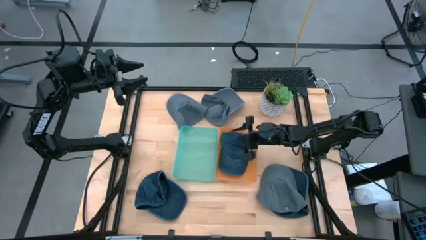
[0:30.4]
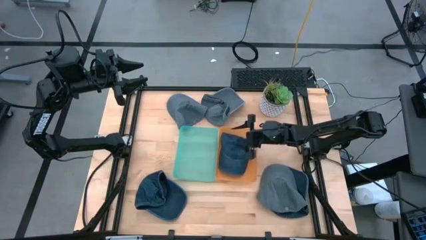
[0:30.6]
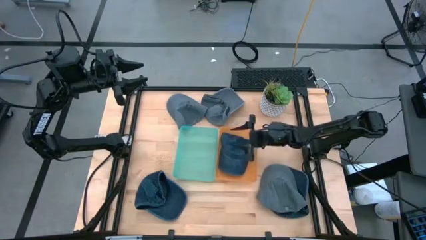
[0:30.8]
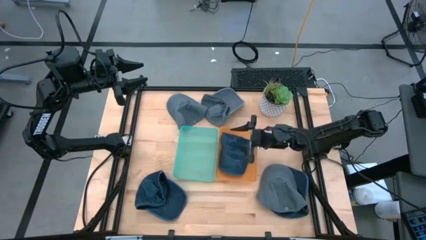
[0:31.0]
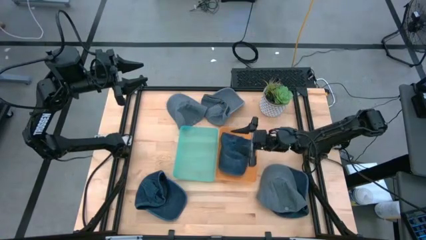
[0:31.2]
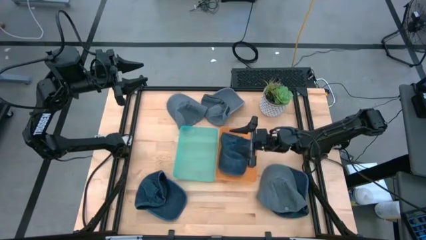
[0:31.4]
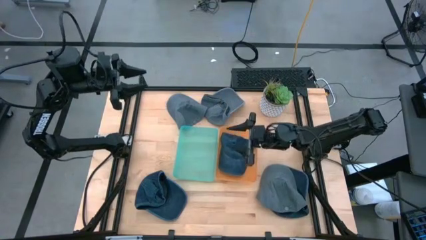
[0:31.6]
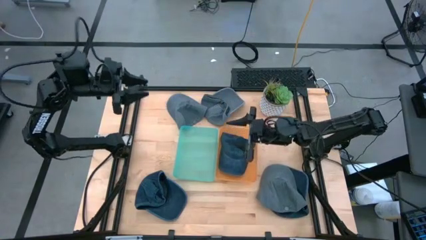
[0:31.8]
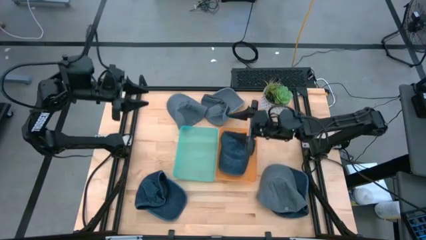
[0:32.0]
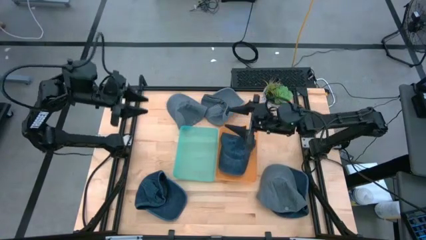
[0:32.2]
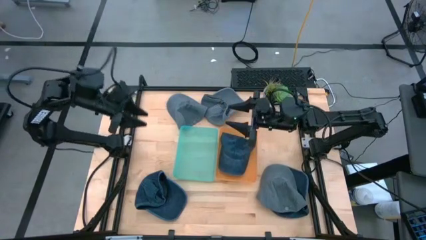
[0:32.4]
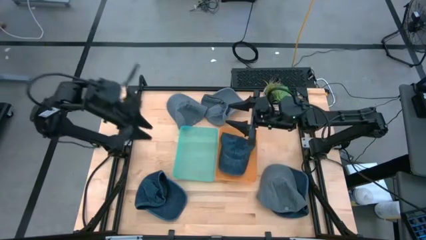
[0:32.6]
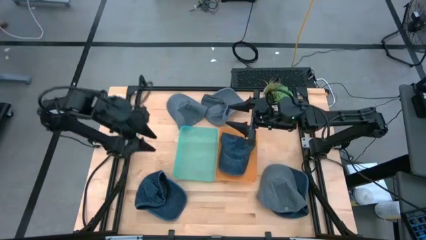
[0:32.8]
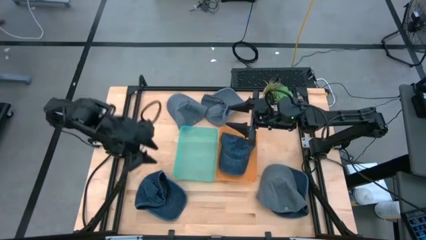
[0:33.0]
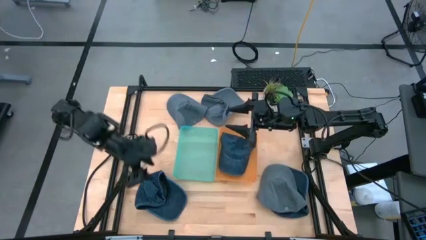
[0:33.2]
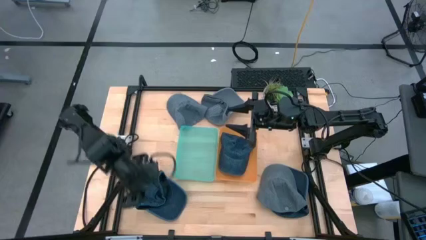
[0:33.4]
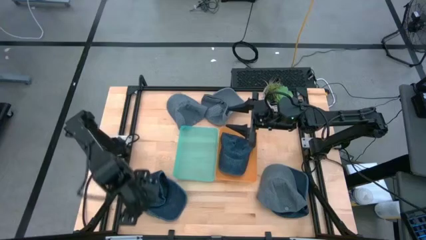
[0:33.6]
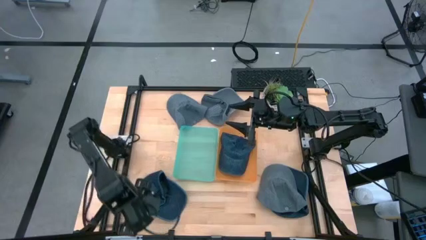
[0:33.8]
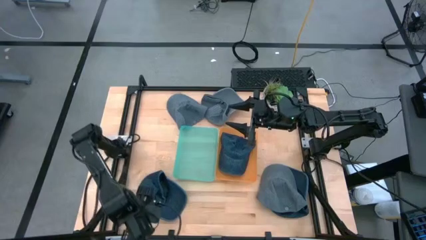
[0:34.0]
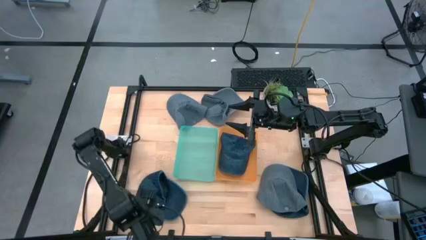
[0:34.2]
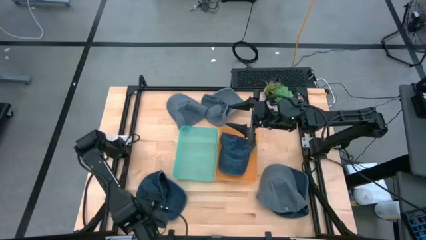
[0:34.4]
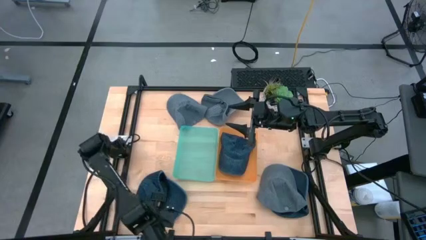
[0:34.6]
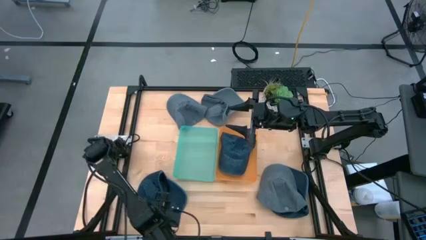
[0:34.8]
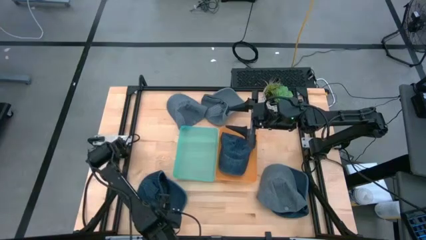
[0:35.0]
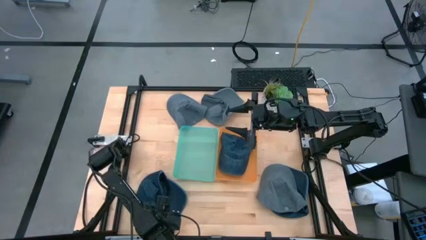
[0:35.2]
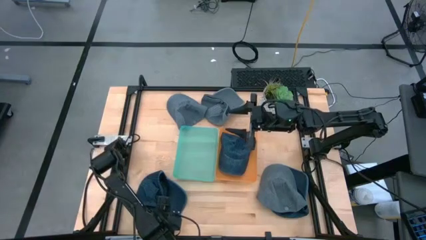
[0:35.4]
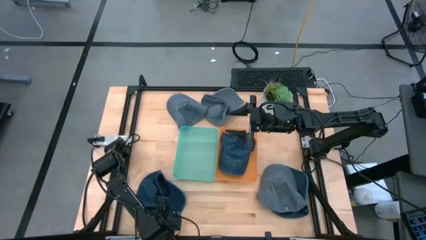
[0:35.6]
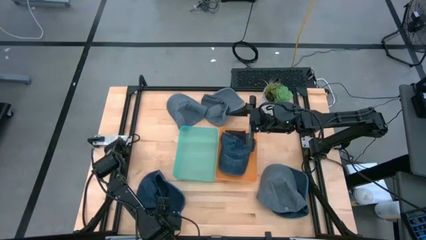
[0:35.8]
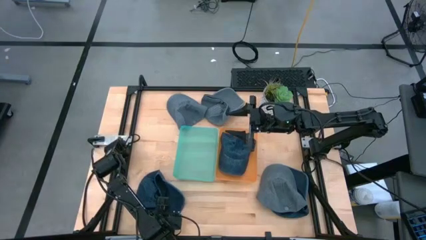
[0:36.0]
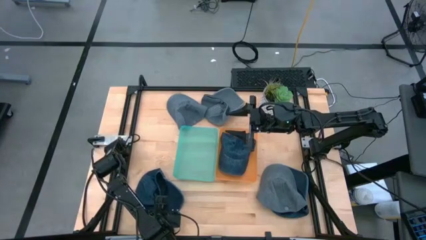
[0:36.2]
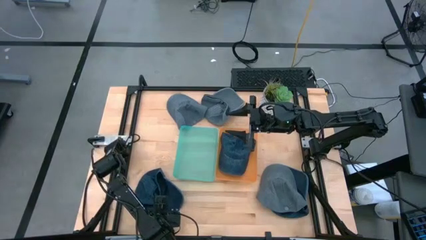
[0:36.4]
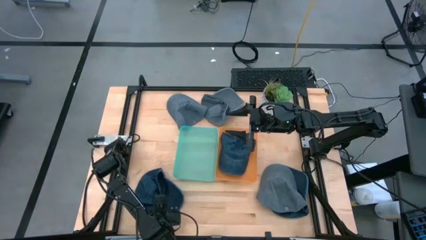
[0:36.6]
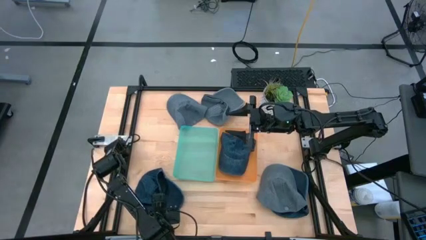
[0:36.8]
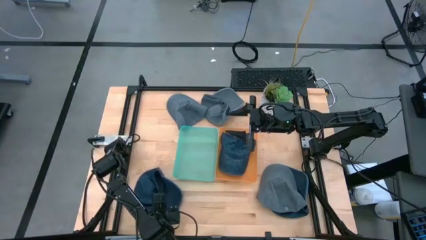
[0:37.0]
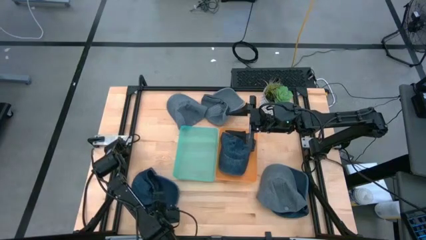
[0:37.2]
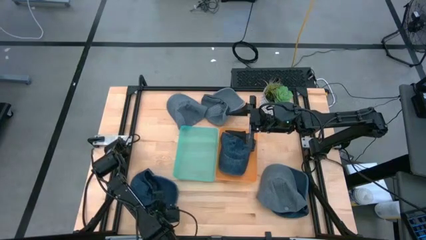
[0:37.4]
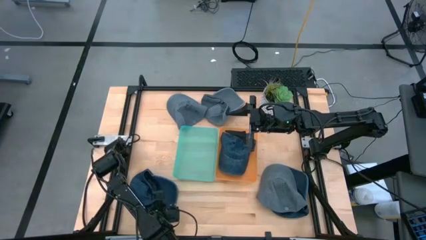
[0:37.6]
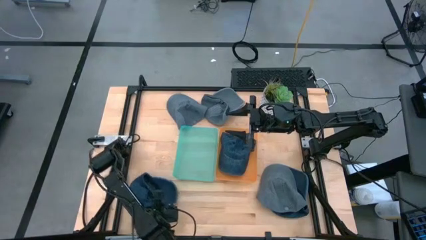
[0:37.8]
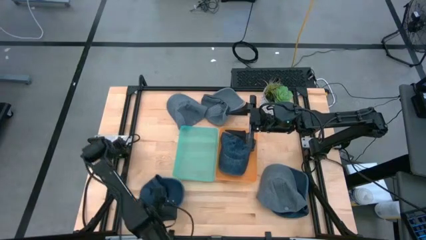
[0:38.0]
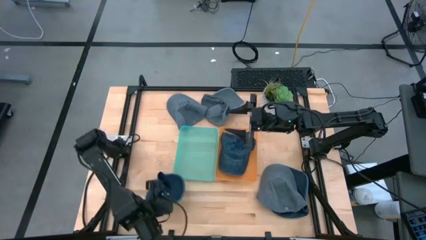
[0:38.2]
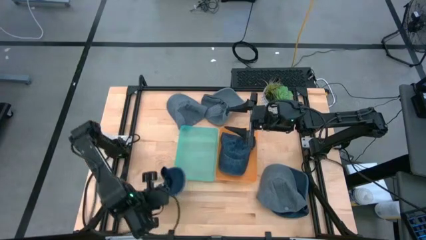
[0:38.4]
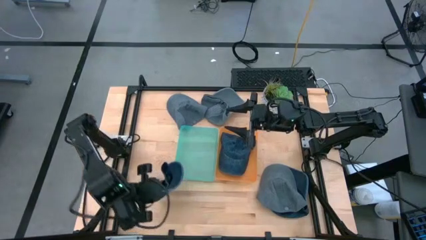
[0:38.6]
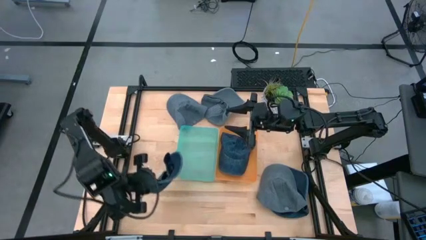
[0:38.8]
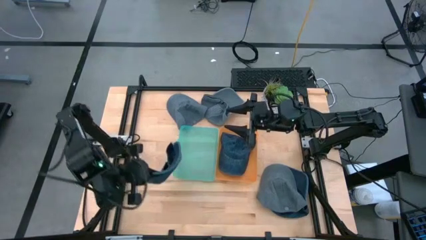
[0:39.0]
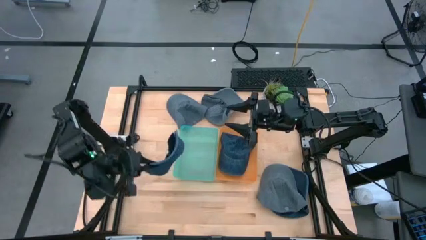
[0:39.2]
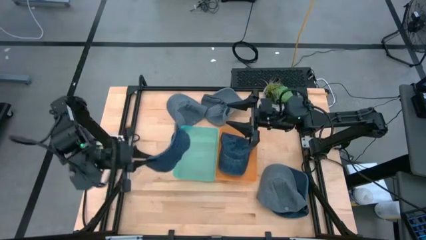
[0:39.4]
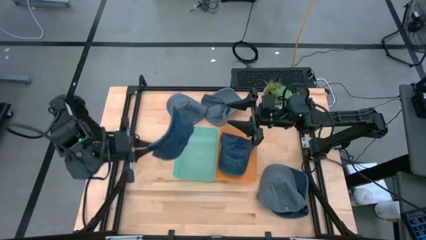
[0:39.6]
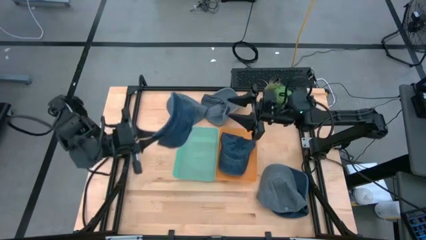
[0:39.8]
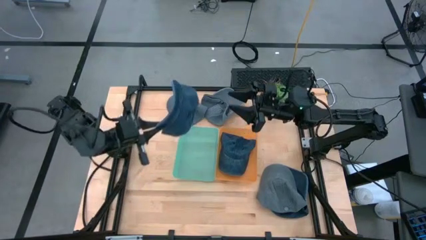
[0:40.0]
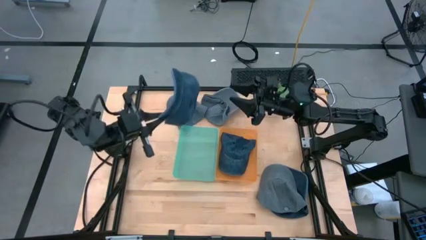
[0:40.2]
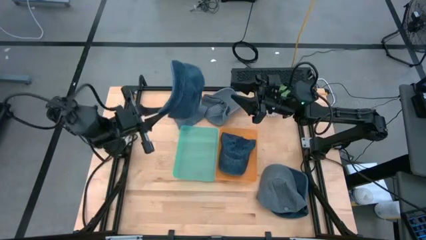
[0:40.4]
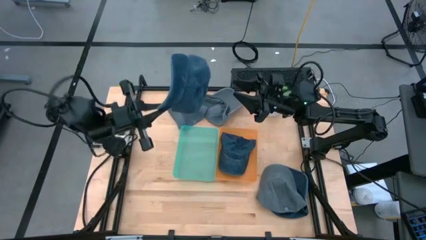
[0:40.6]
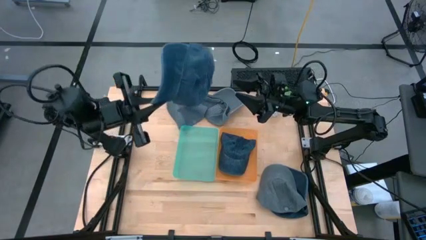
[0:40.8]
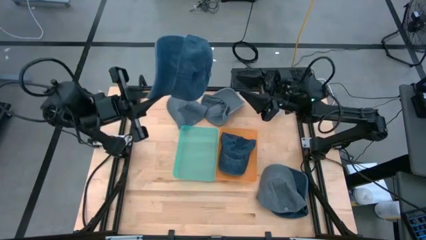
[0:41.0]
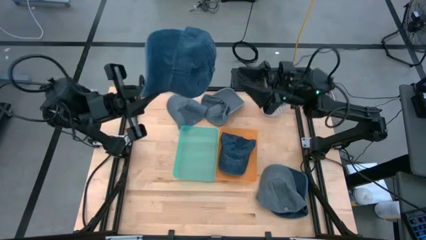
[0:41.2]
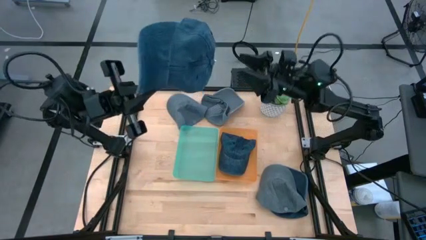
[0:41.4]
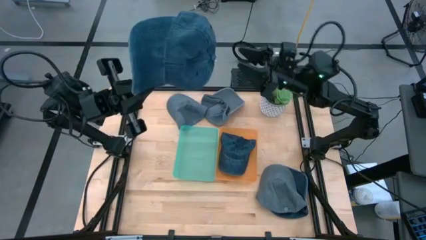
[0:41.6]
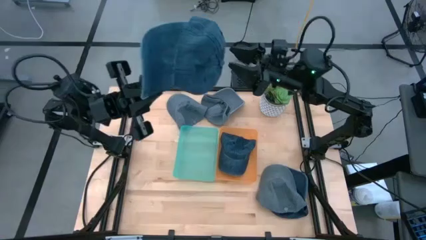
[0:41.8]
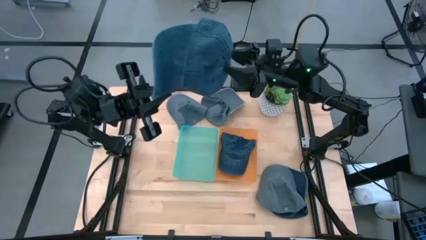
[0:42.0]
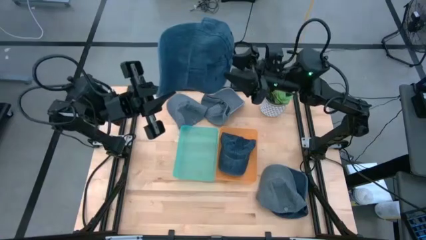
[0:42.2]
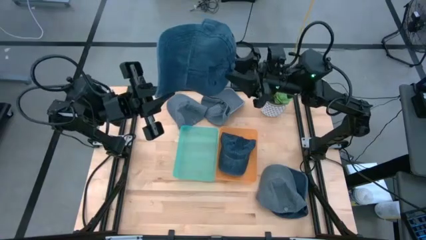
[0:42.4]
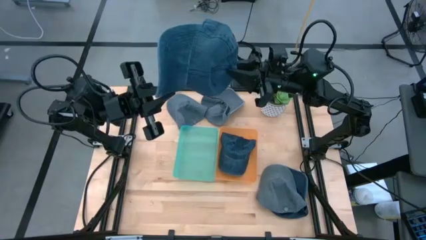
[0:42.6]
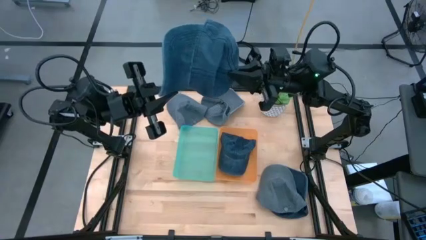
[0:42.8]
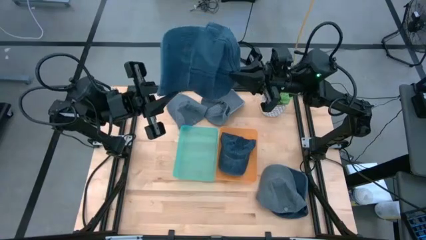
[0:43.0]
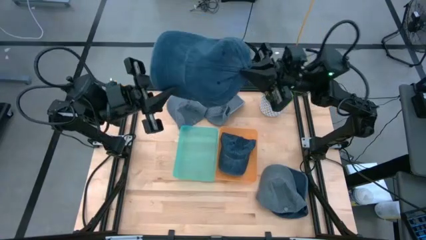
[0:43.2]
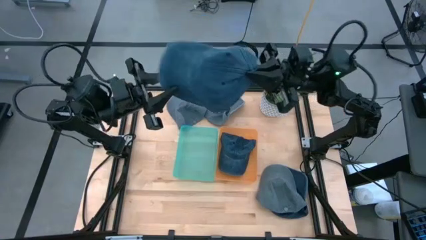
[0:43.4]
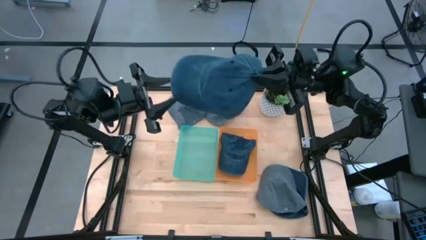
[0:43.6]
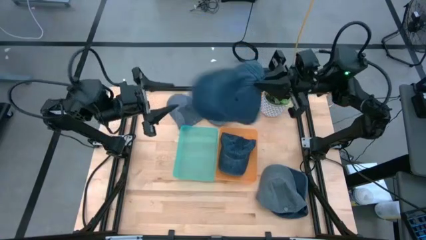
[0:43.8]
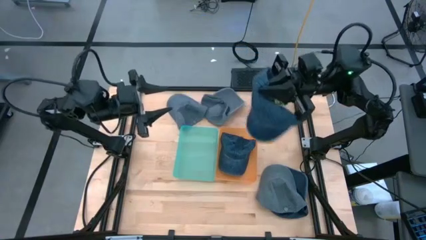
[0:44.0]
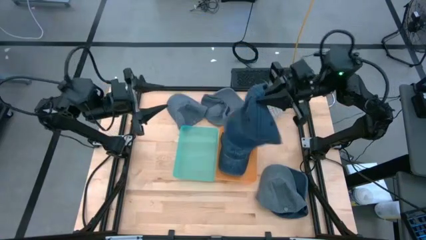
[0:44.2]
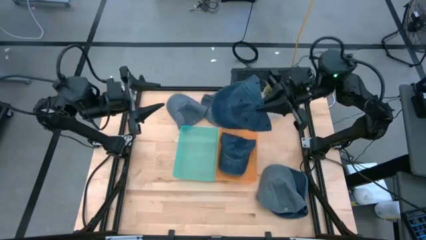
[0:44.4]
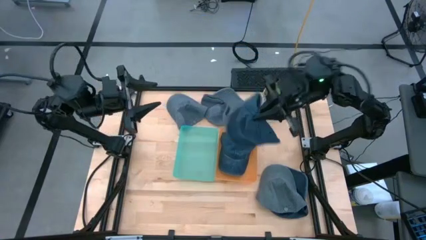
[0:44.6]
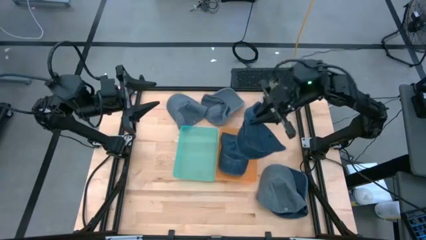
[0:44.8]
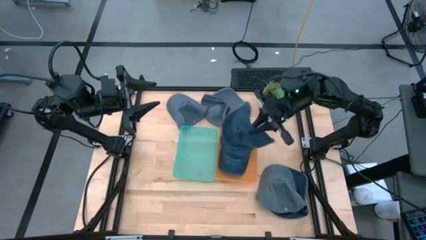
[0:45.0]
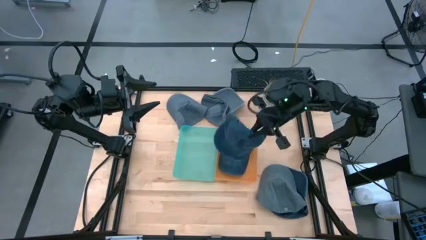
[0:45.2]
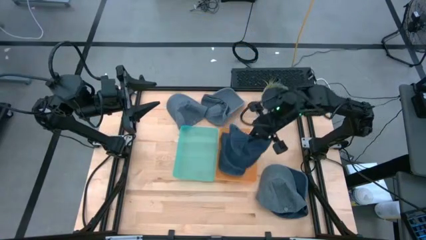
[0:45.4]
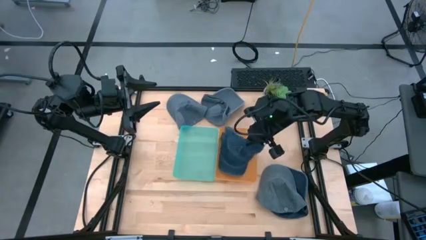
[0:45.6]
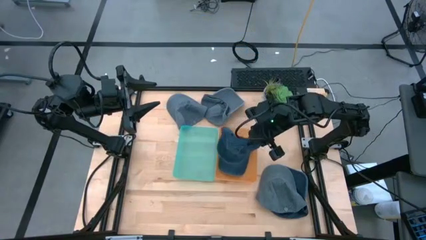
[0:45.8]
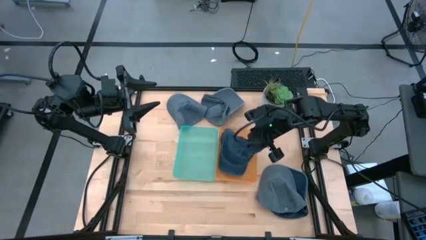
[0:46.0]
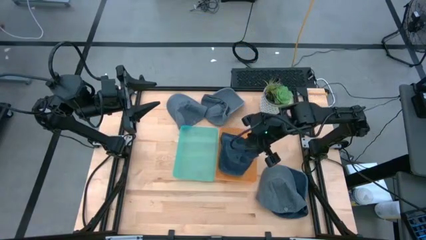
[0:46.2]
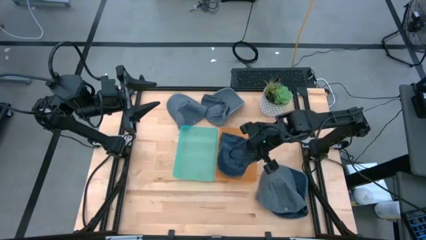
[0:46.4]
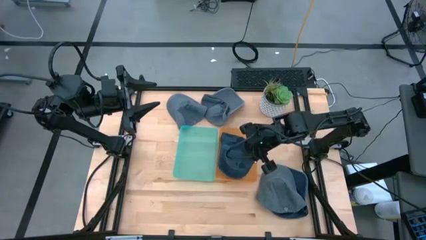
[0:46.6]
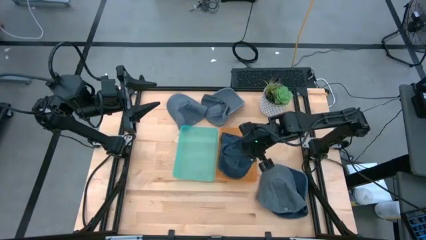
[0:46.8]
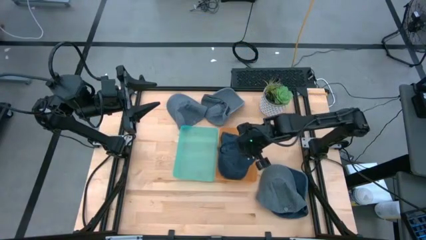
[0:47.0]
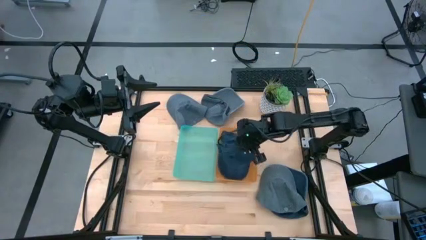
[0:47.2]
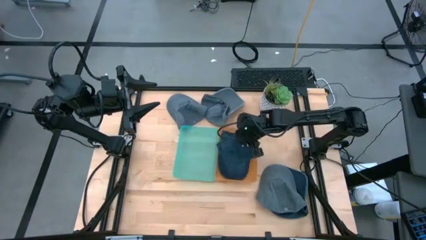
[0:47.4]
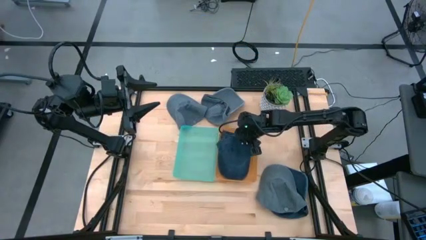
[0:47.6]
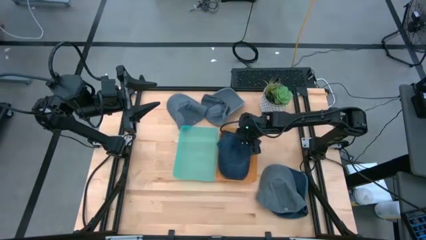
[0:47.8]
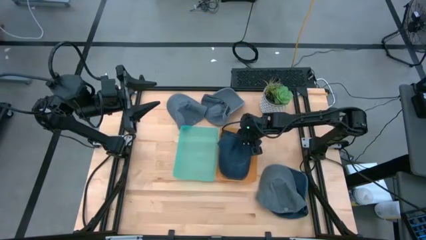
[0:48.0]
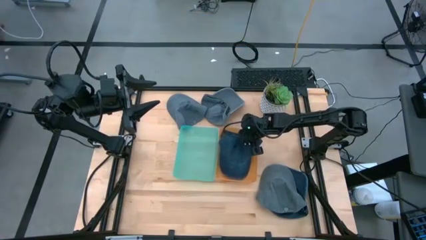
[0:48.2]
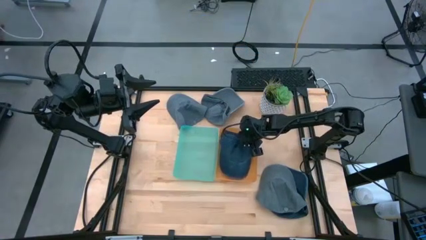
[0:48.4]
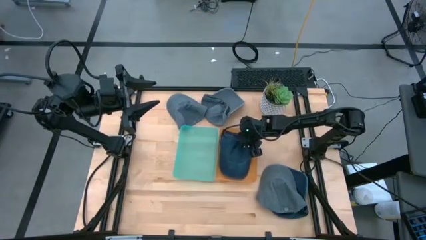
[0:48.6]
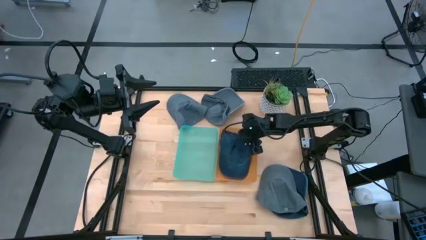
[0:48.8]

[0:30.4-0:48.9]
Task: Pick & Place hat
Put the left blue cap into the orange bin
